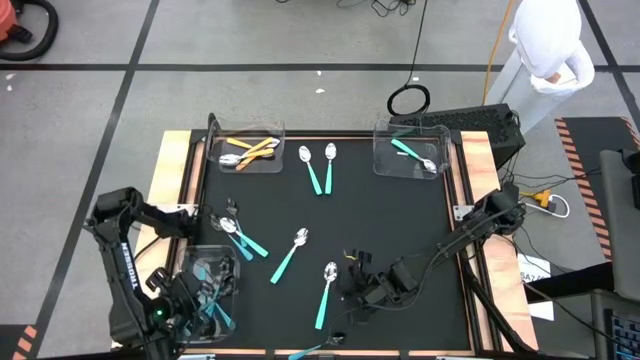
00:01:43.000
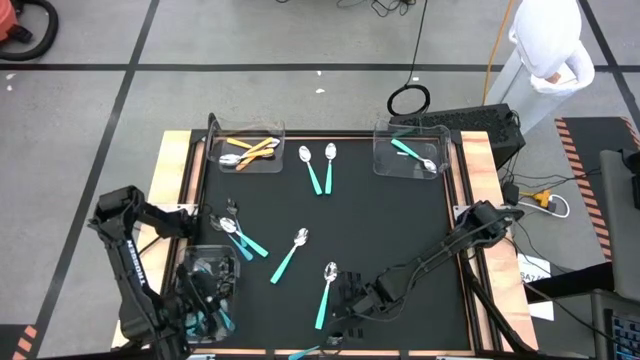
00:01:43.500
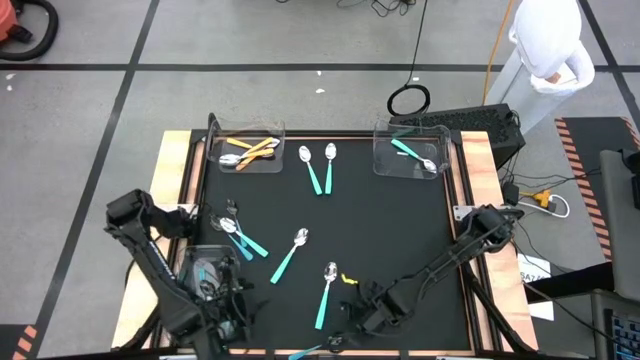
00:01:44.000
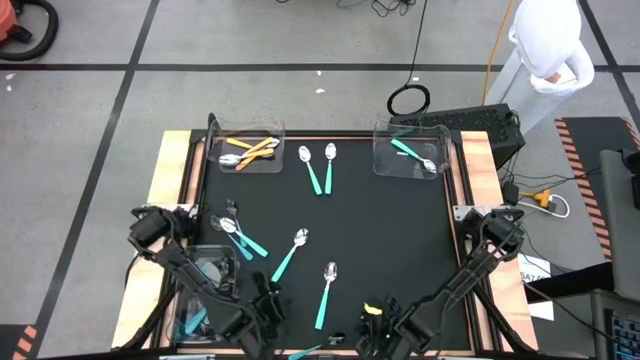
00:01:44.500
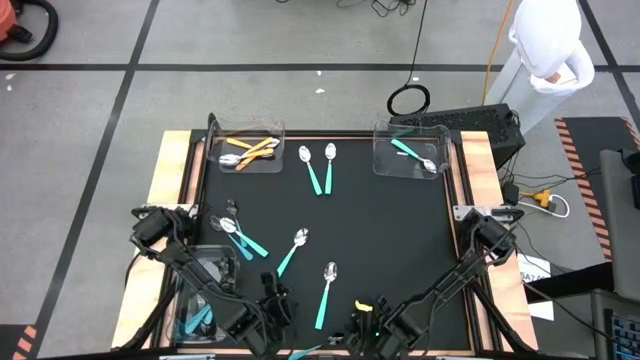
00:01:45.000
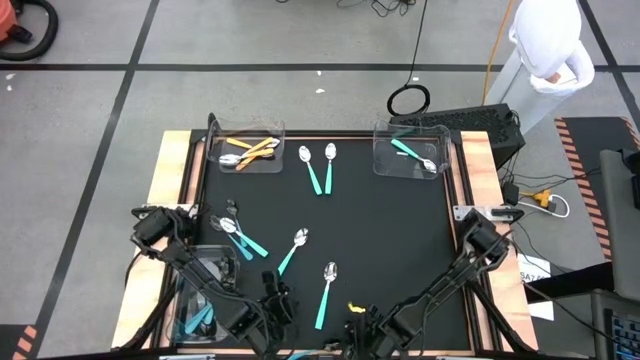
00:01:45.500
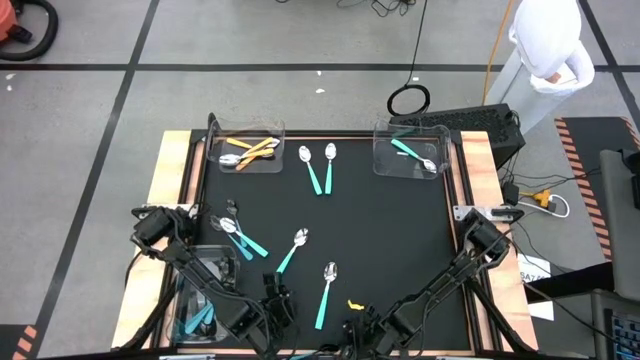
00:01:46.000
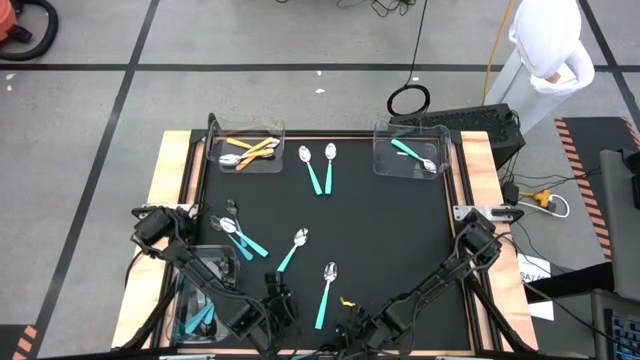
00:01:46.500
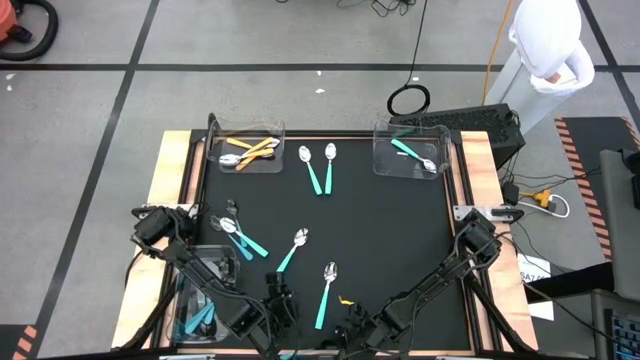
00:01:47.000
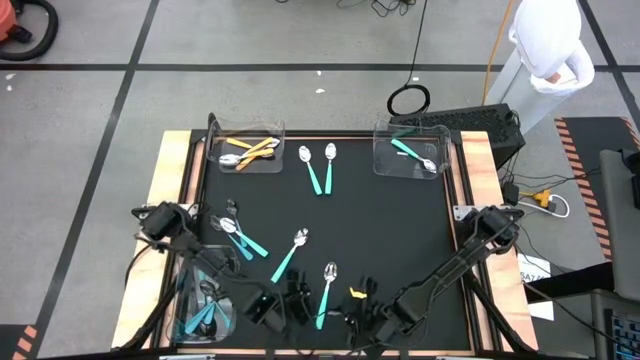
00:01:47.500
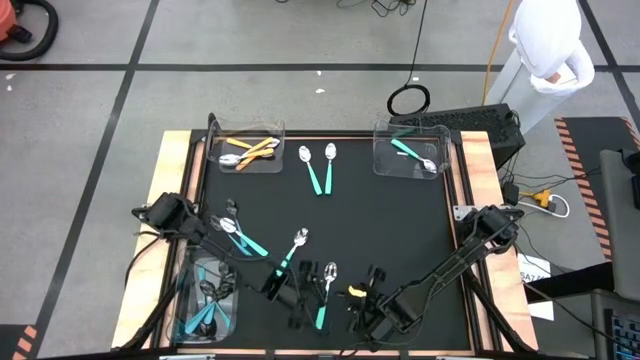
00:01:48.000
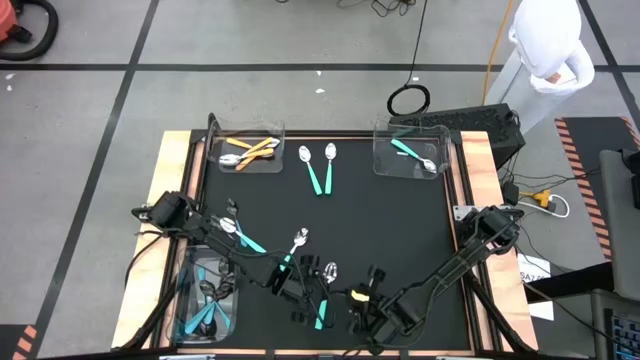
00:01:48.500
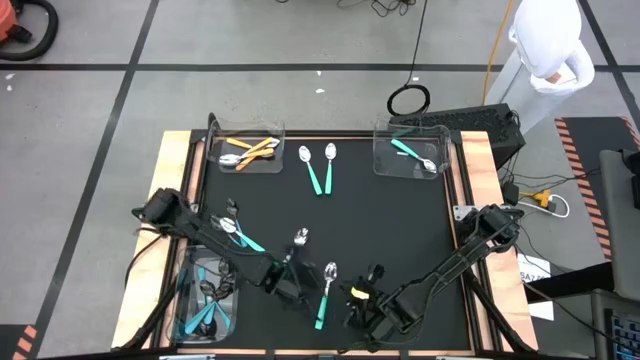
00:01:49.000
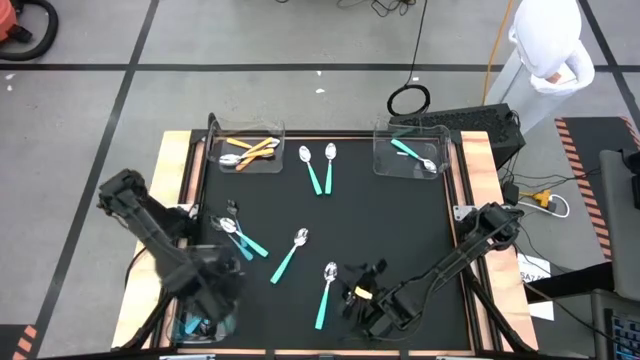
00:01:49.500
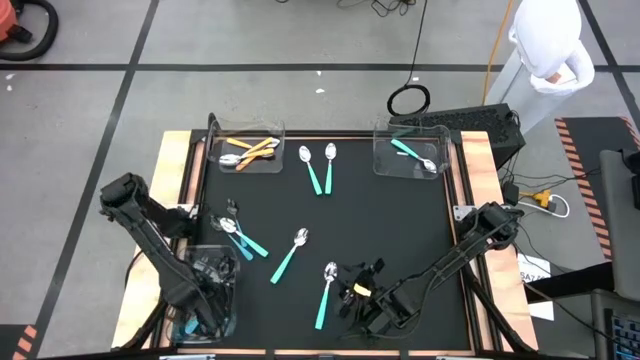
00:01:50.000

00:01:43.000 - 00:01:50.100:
Task: Sort silverware by color (type)
Put the bottom blue spoon into the bottom bin

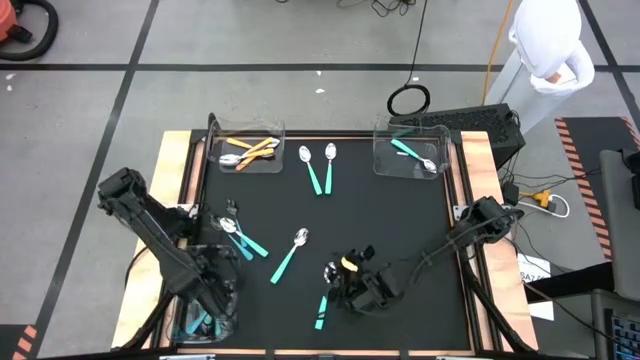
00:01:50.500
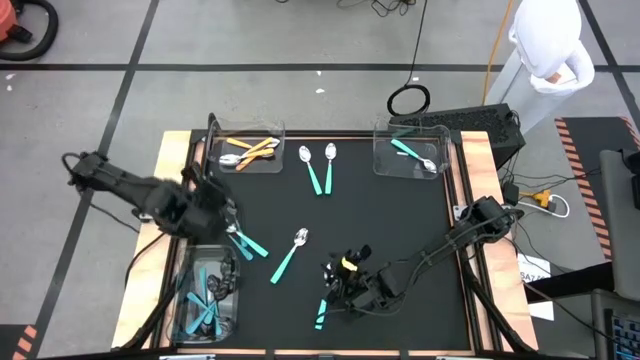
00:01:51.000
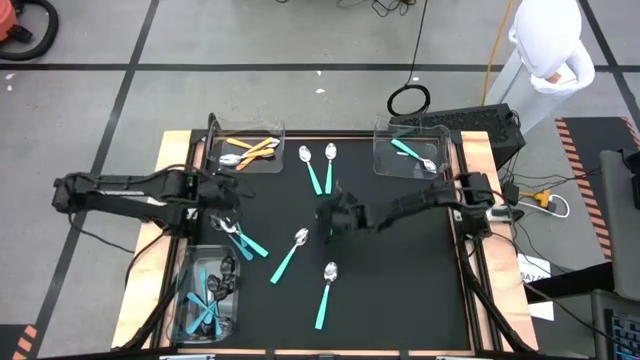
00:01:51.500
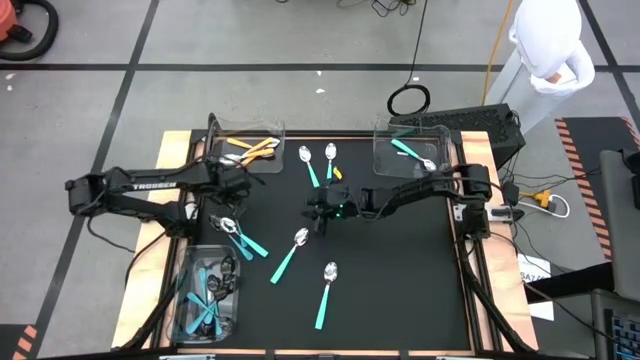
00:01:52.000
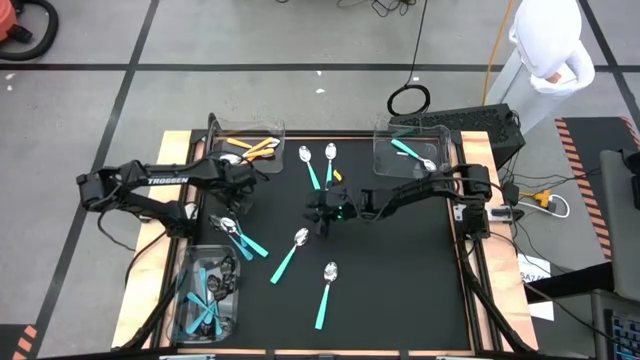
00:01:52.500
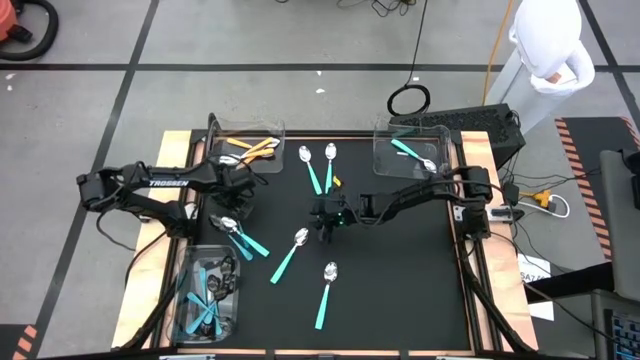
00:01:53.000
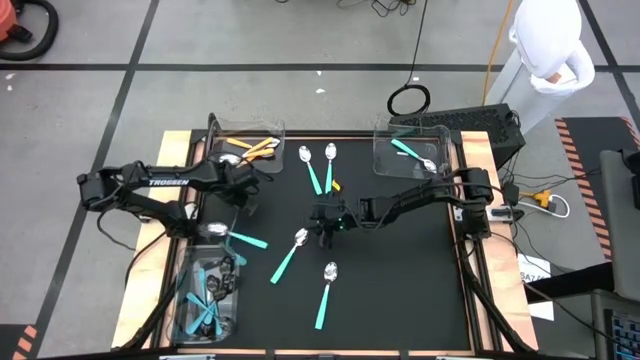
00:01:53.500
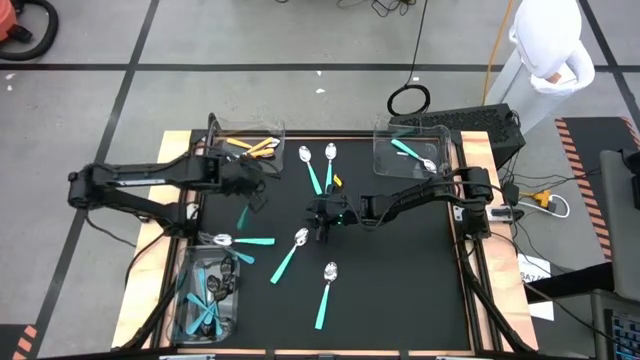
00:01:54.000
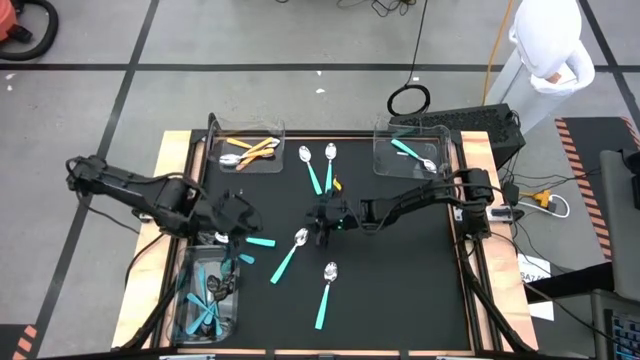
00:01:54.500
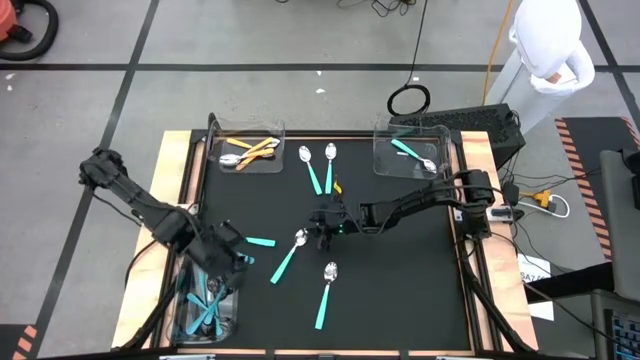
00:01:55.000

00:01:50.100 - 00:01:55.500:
Put the right blue spoon into the bottom bin

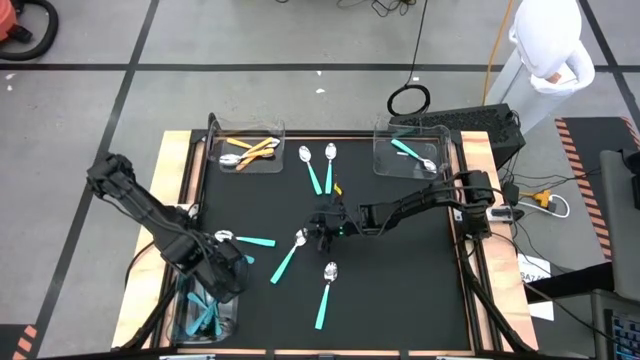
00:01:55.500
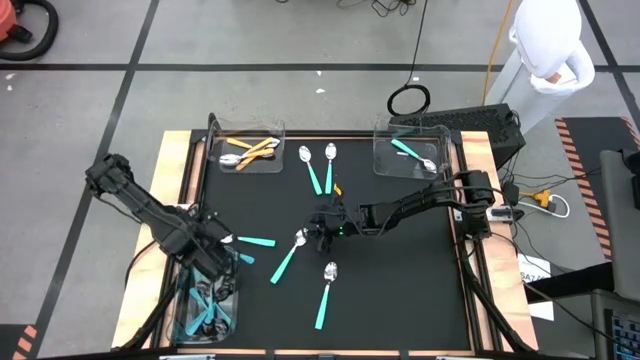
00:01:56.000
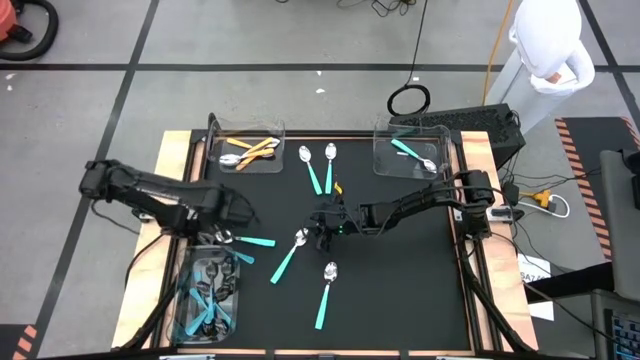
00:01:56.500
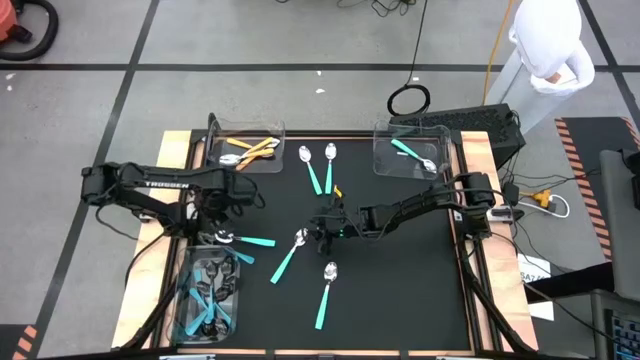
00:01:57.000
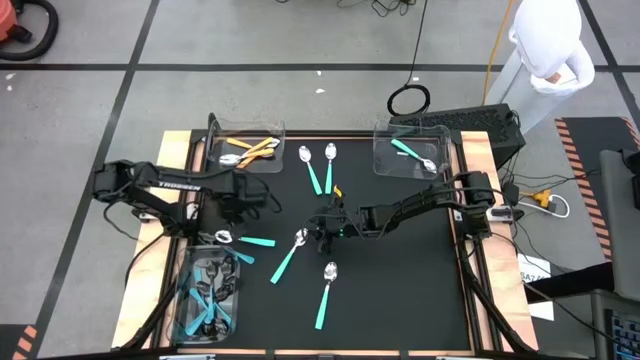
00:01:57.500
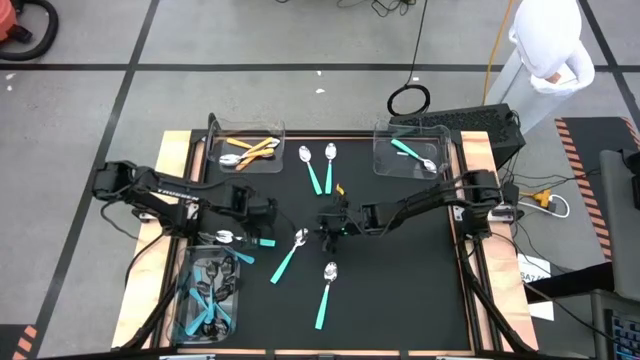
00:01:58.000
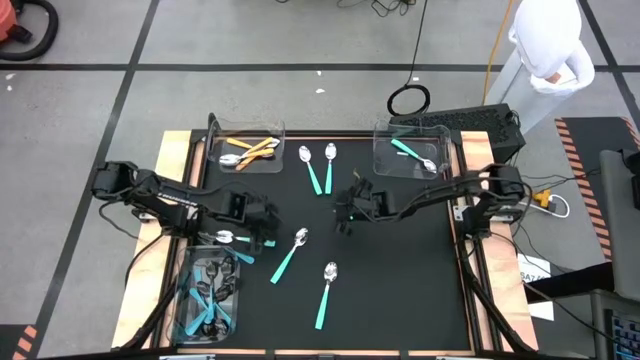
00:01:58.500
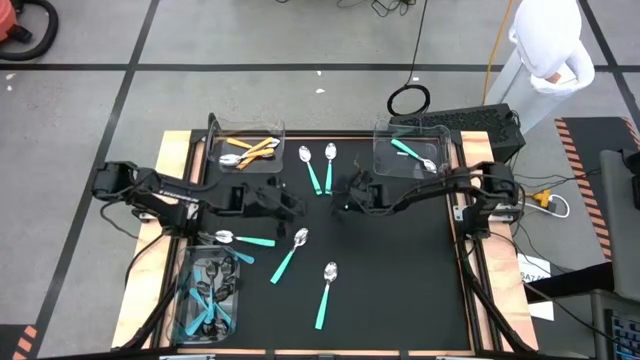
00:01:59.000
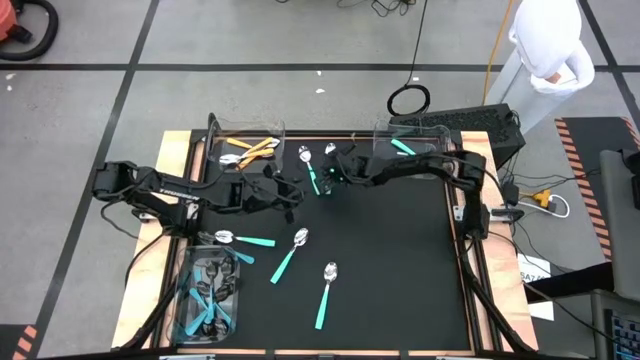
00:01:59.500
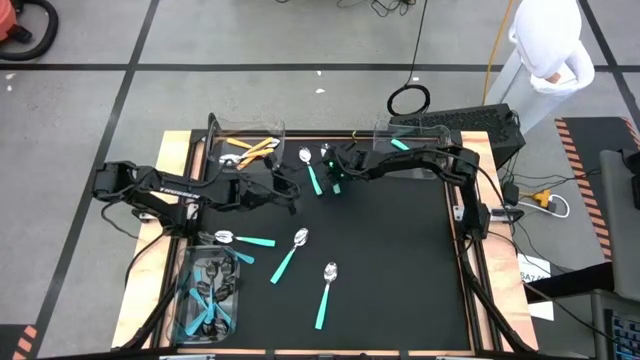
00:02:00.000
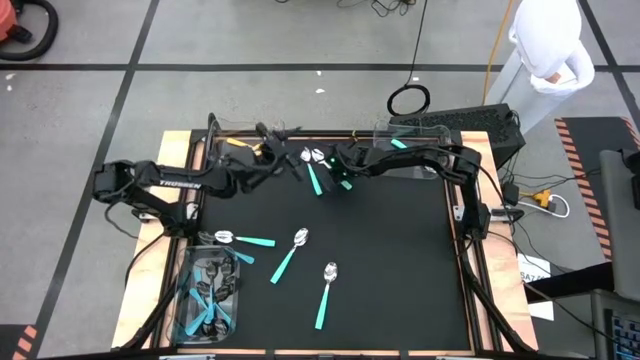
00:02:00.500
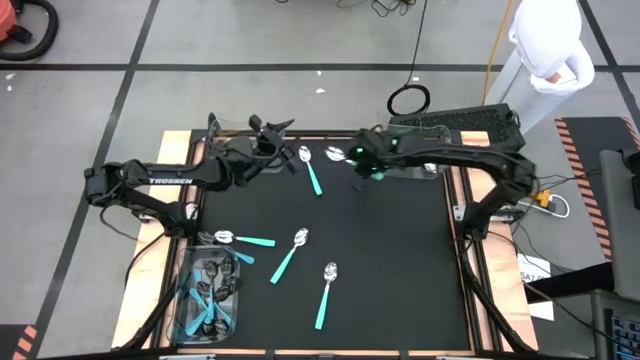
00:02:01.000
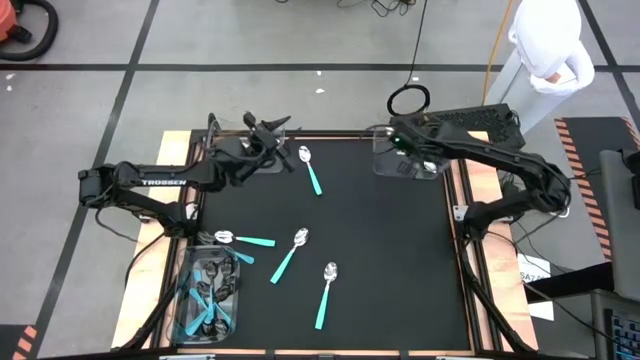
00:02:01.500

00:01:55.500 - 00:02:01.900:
Put the green spoon into the top right bin

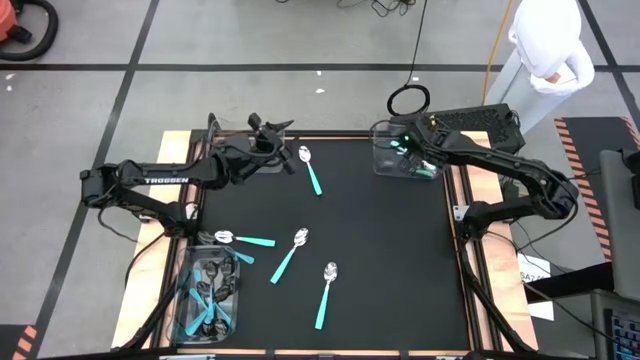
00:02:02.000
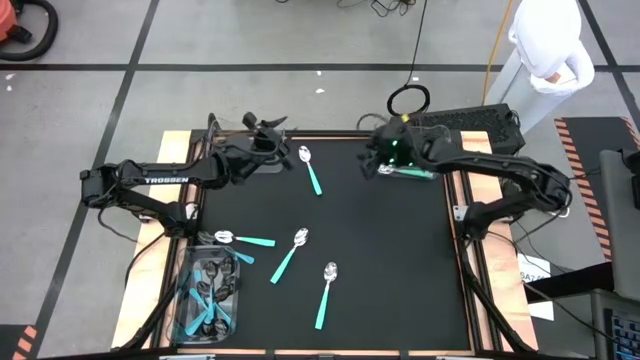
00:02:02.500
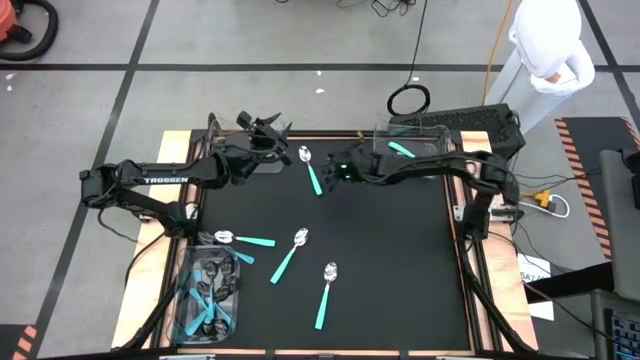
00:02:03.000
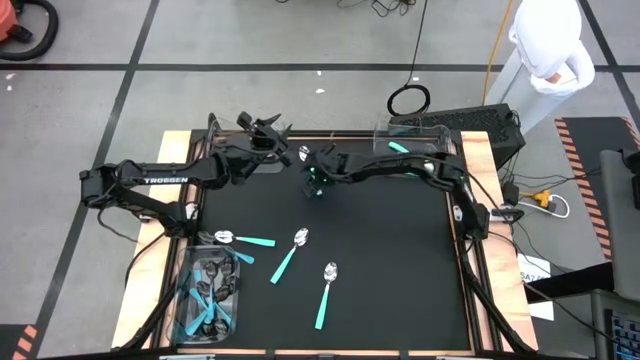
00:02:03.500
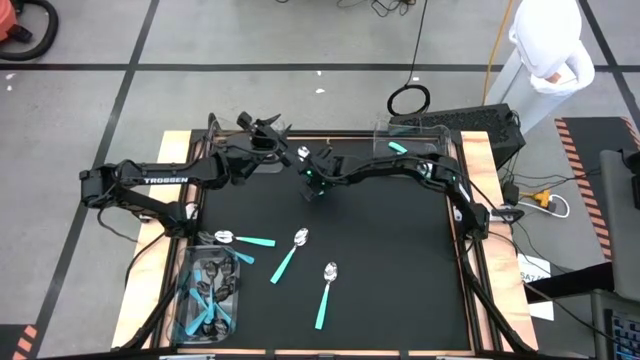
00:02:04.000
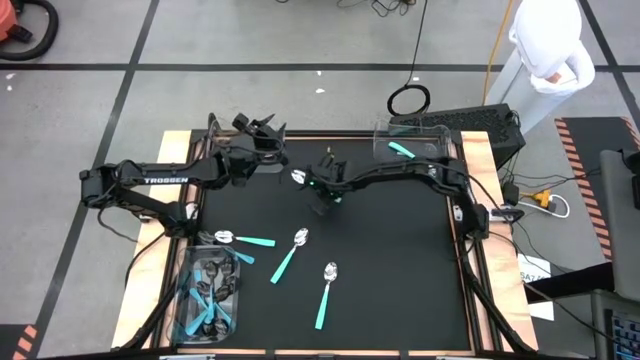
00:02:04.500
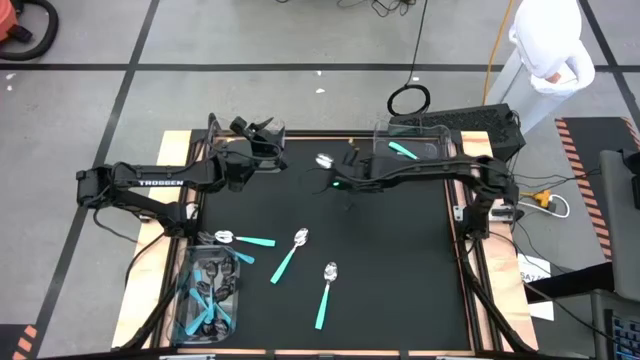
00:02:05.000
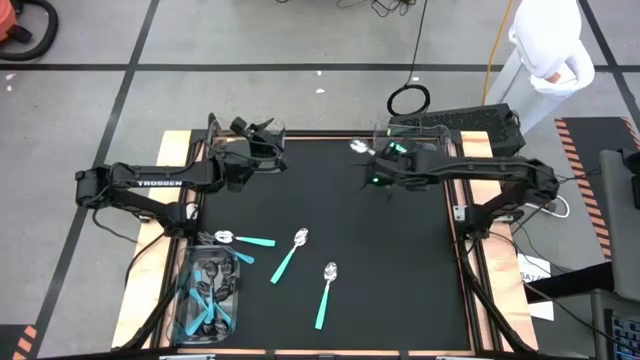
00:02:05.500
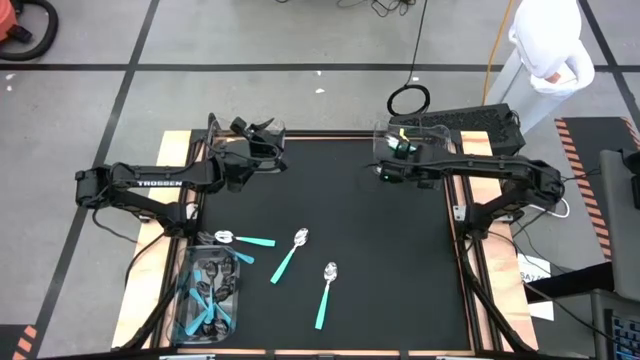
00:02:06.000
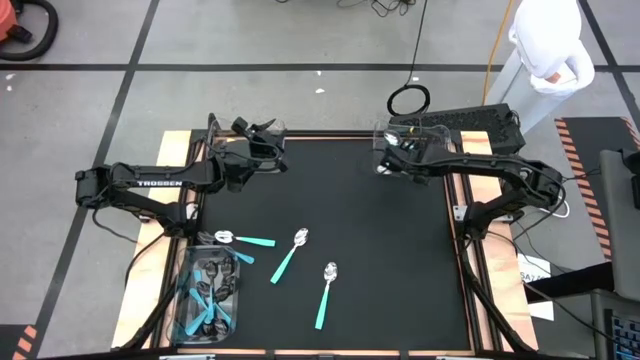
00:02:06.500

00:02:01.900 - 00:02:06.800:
Put the green spoon into the top right bin
